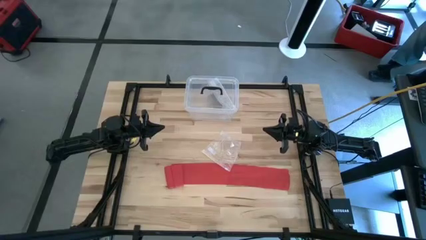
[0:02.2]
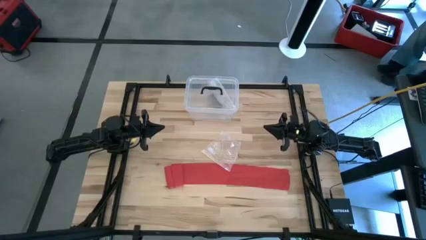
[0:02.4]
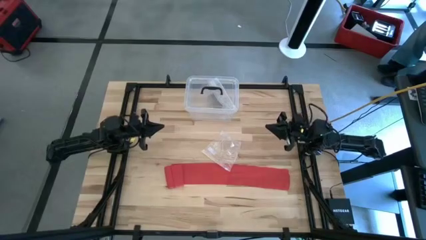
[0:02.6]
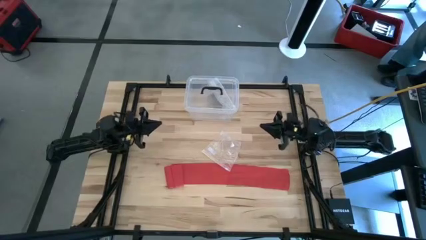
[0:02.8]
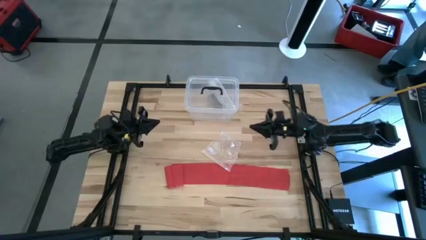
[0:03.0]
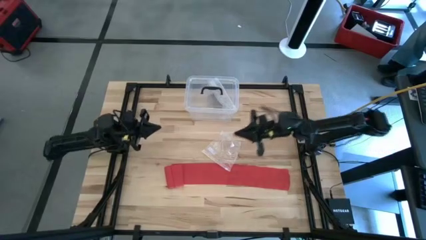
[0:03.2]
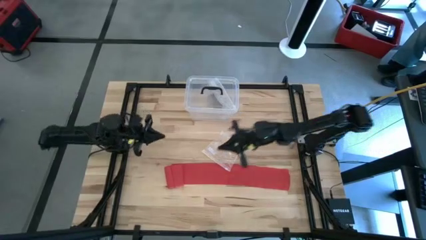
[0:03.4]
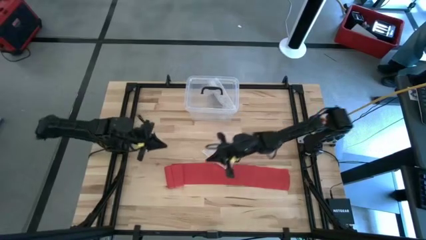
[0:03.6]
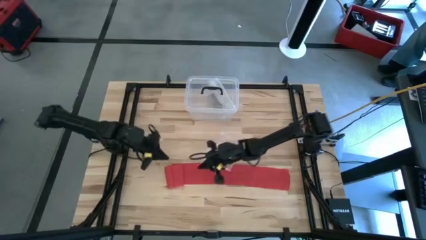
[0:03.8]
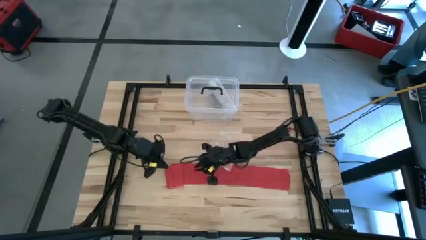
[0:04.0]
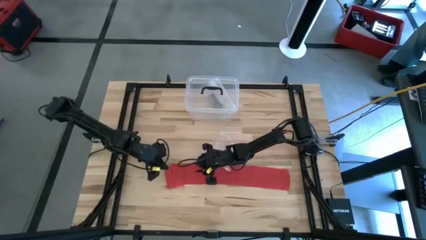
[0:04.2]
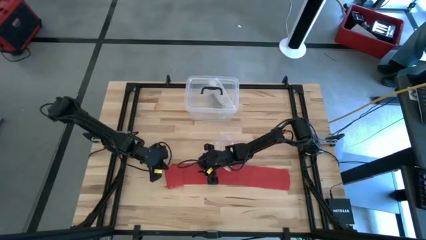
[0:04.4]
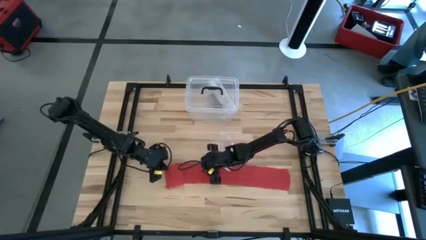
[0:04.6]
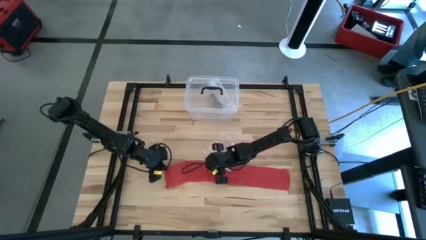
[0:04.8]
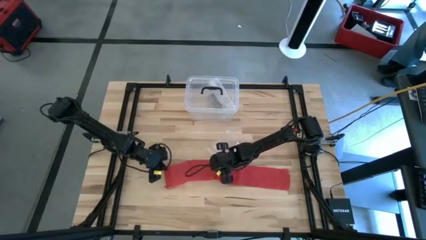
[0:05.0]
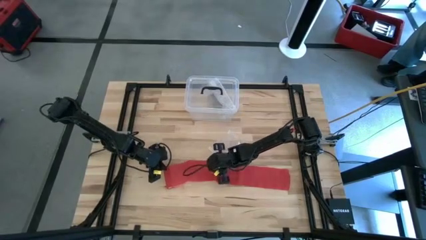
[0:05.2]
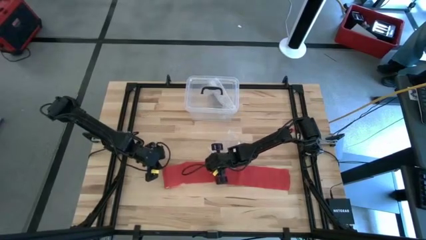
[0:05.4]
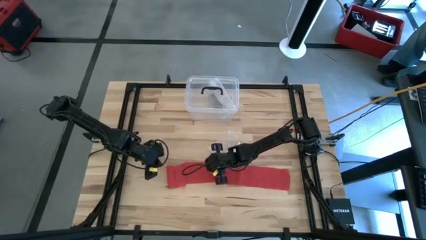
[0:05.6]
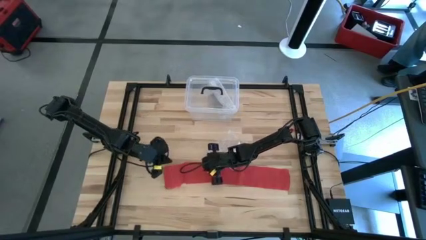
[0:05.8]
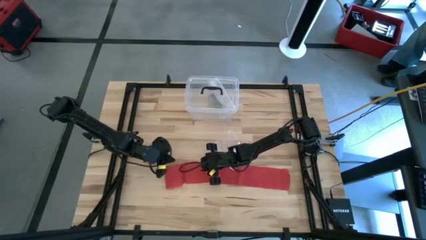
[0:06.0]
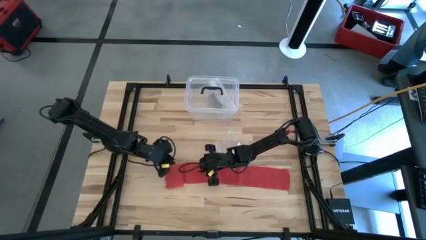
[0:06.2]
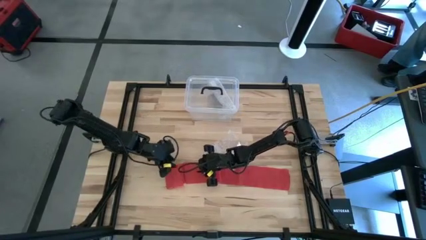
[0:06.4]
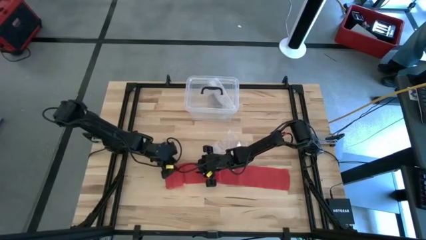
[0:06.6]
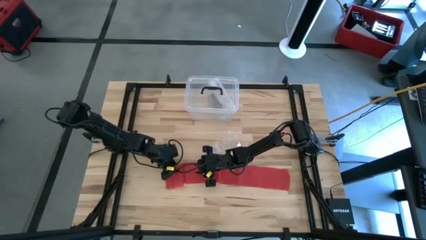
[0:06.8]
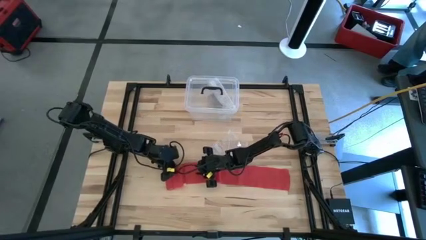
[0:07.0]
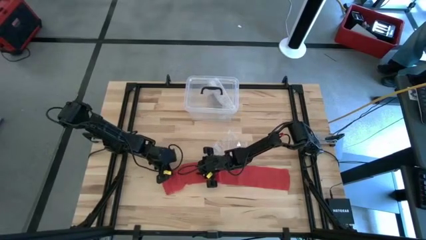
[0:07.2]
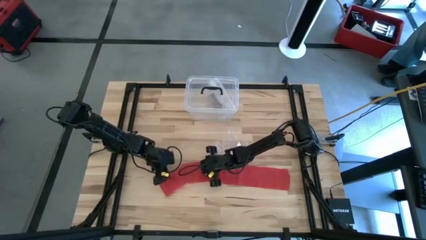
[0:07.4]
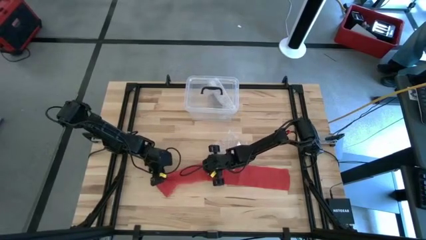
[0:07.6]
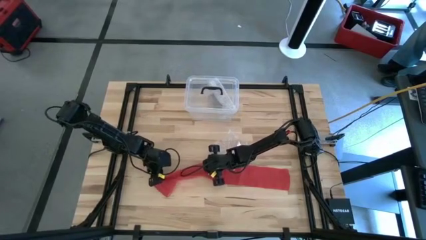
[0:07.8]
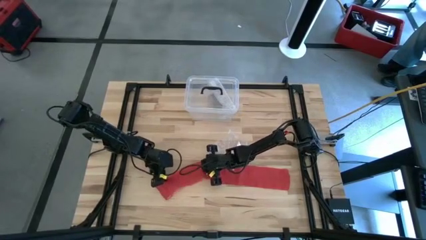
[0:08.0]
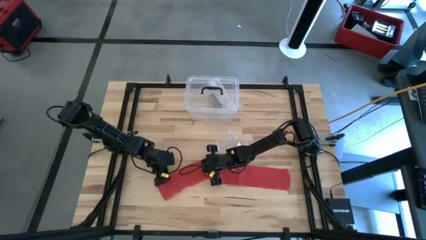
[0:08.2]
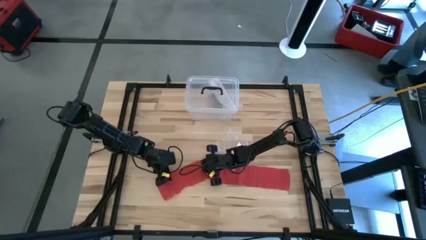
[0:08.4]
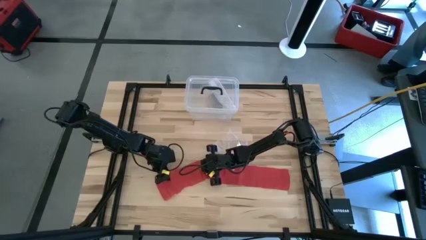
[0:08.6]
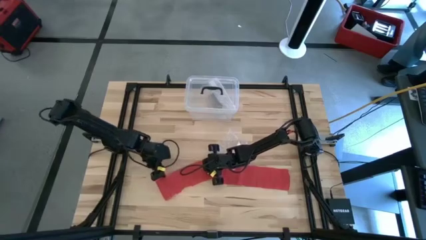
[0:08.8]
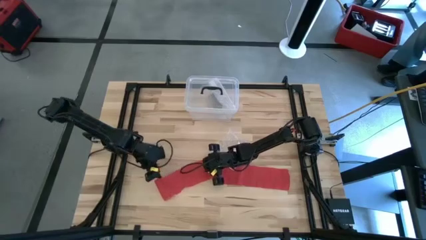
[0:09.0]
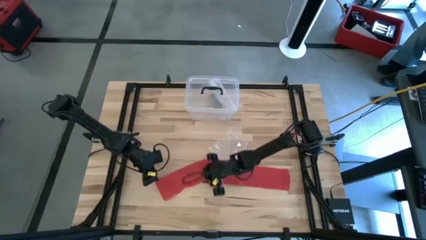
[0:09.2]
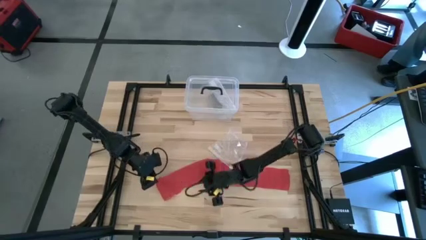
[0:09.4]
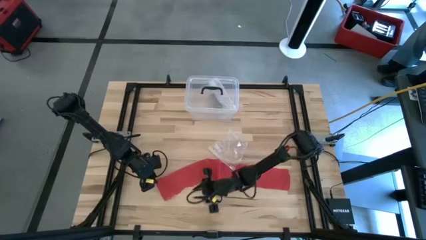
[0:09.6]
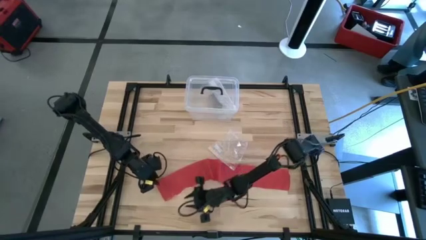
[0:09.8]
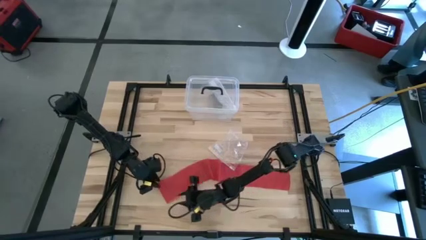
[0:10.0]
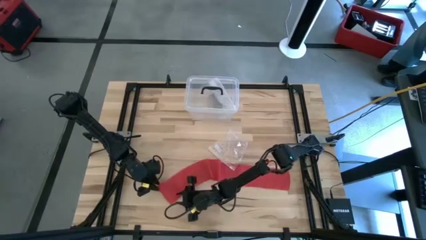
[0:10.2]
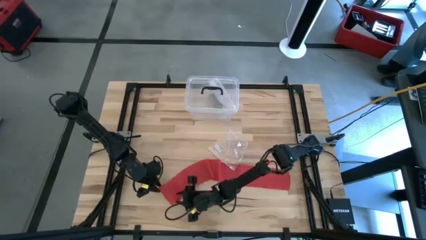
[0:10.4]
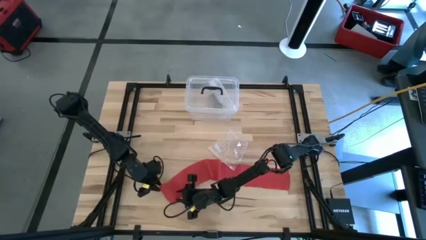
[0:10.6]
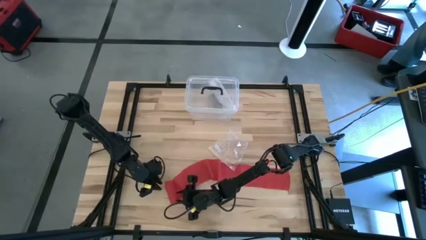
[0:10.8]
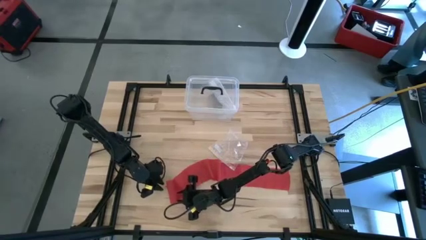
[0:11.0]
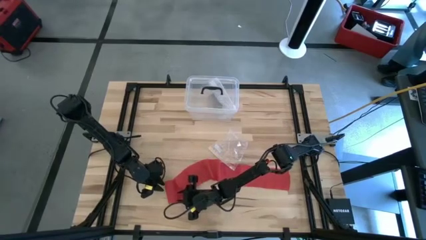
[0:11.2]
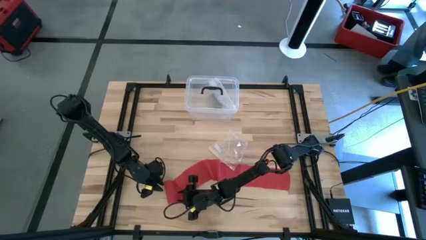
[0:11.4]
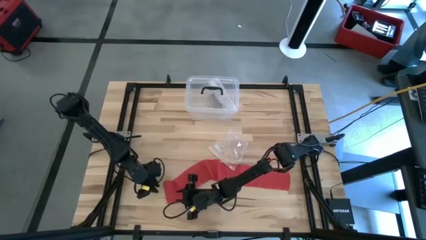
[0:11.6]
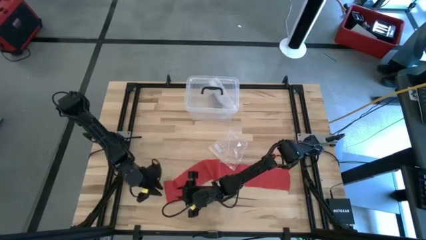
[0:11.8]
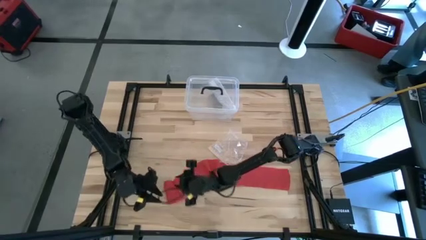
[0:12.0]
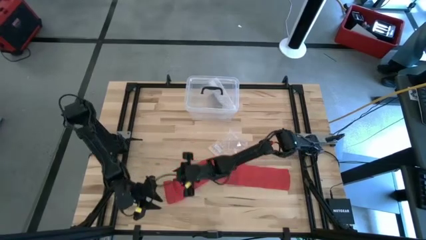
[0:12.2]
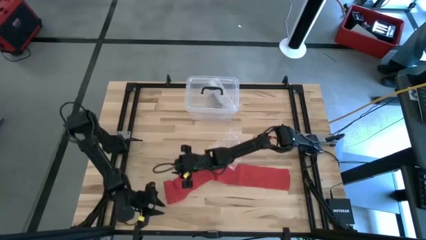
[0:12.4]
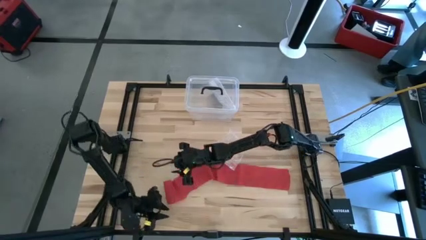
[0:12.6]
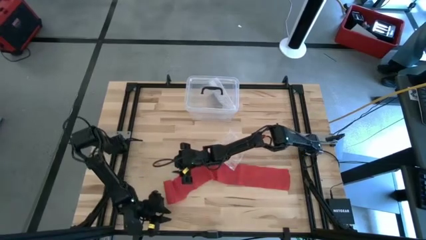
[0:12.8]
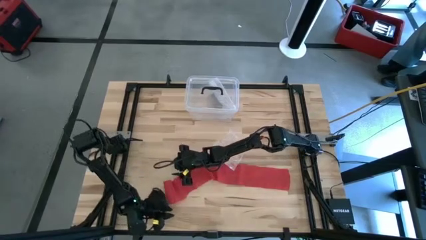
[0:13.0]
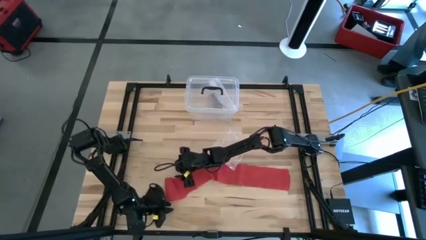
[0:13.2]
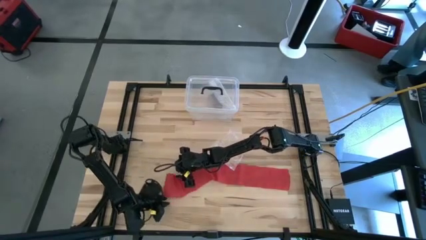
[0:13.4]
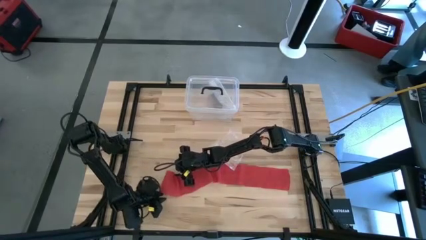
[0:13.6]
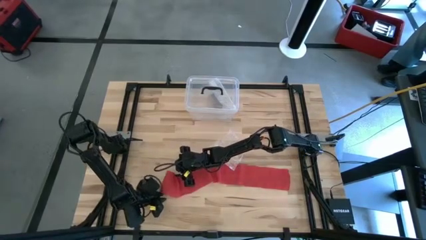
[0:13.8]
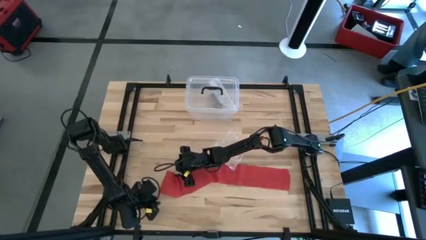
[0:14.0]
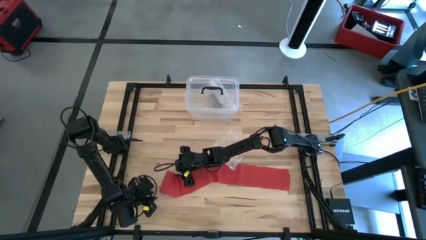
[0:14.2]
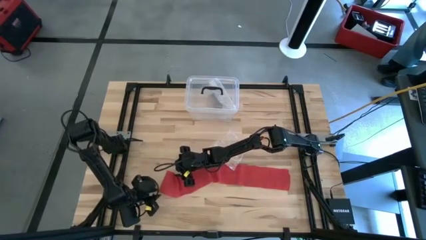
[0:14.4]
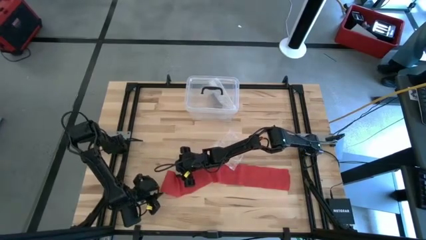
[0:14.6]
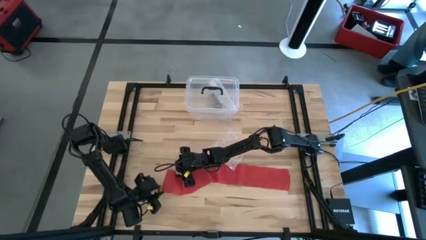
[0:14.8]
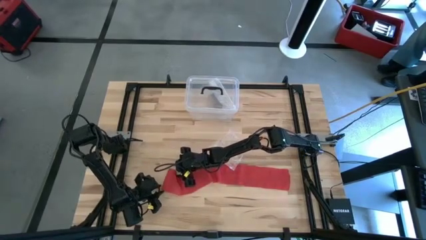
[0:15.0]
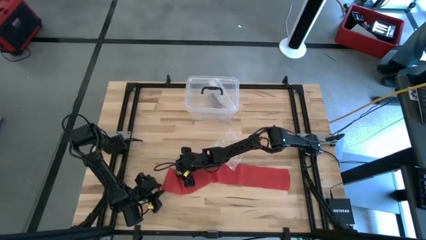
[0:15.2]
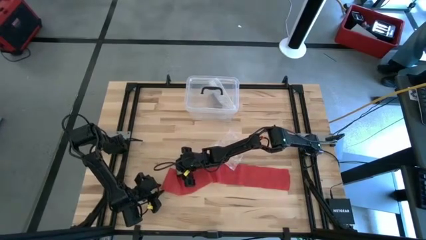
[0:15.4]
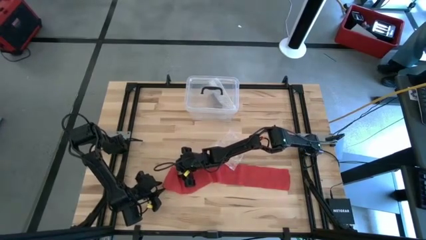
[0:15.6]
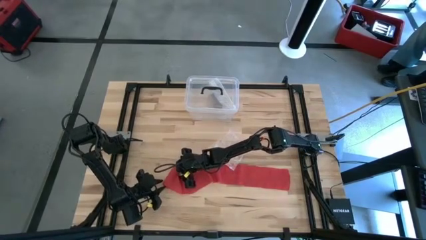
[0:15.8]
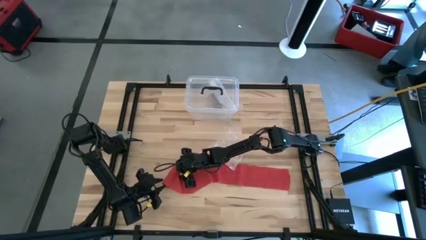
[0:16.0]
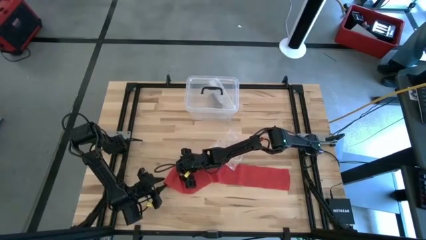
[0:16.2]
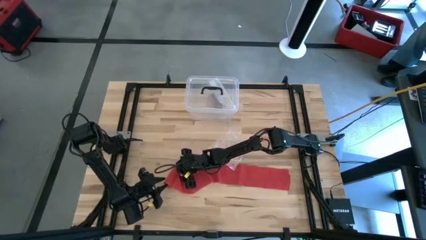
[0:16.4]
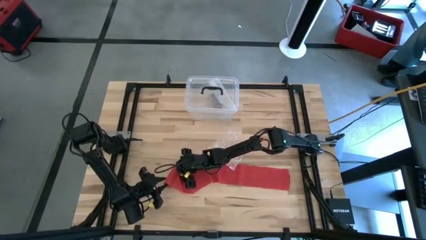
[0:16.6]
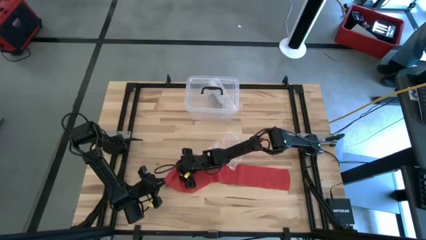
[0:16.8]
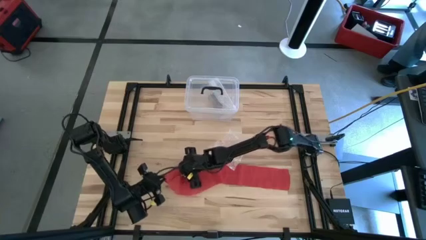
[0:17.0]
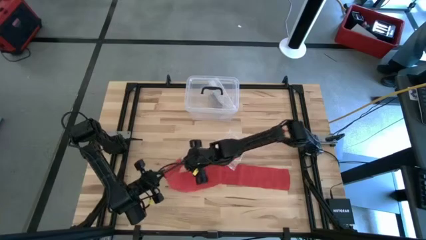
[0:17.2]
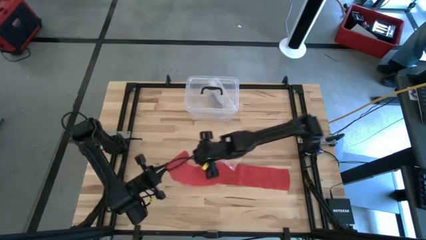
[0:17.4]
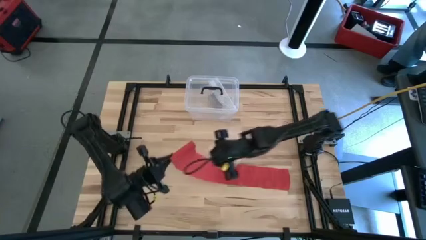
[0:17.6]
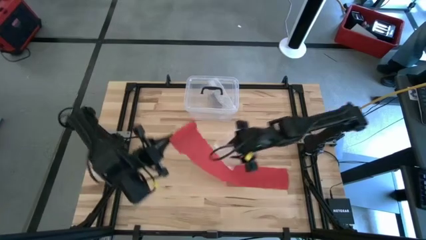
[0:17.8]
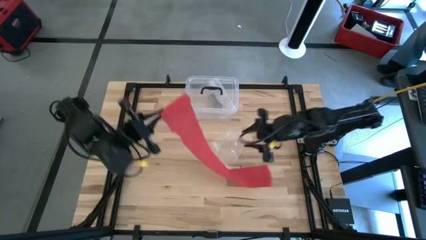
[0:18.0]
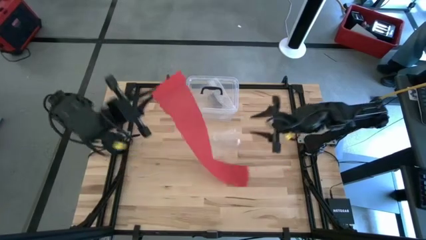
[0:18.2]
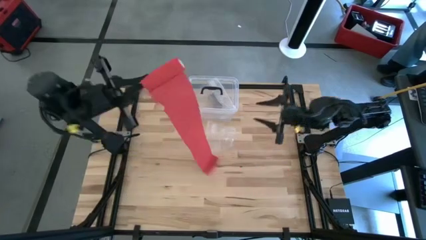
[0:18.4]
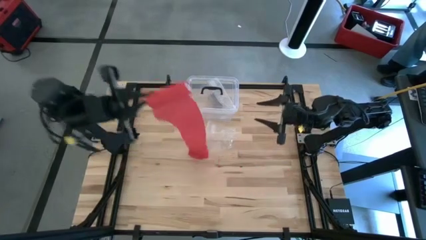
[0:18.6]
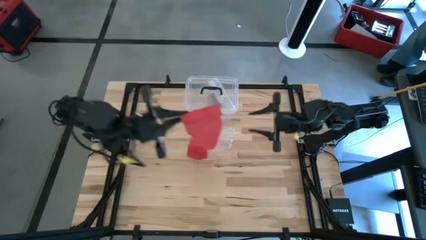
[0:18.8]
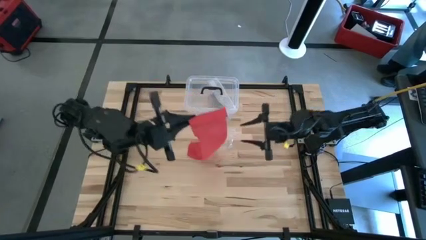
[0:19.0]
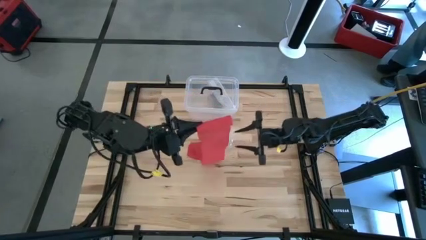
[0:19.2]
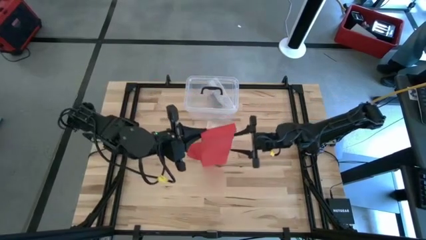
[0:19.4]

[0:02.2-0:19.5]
Task: Roll bandage
Roll the red bandage
